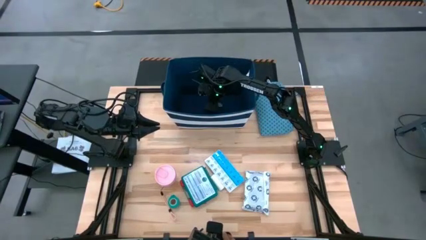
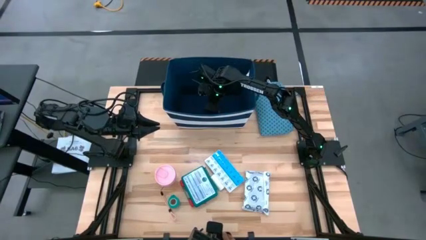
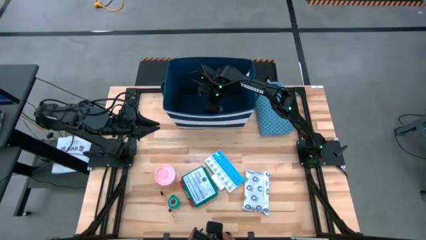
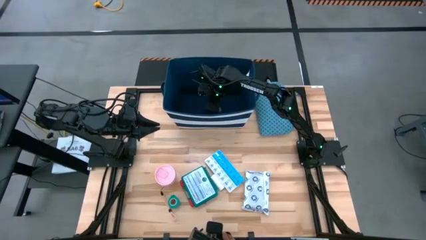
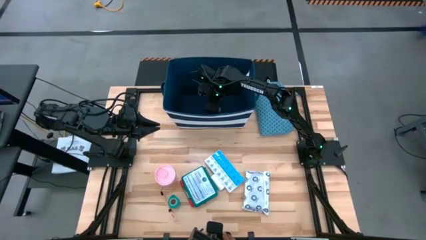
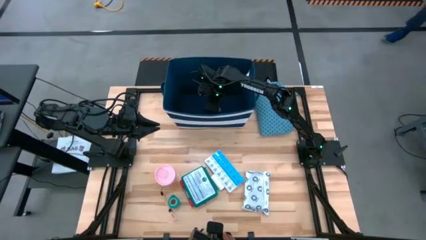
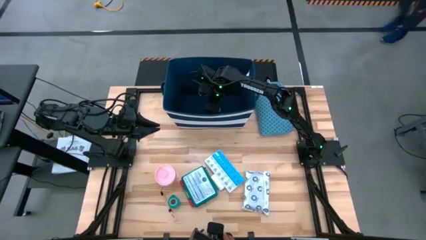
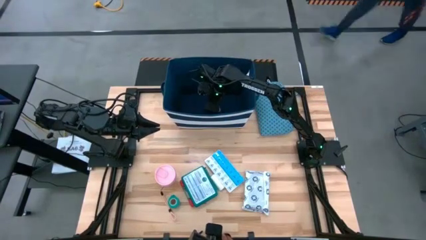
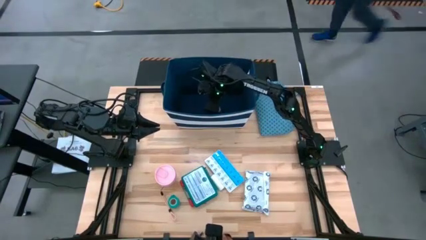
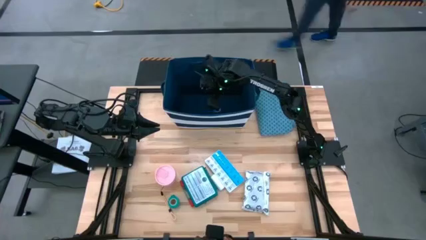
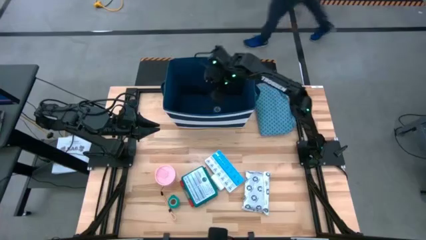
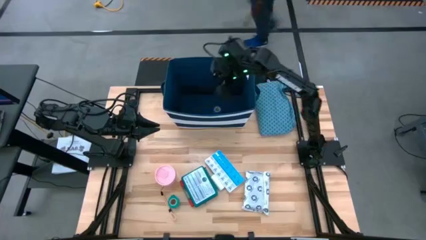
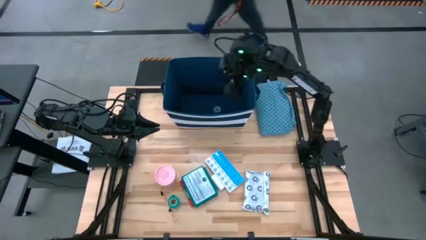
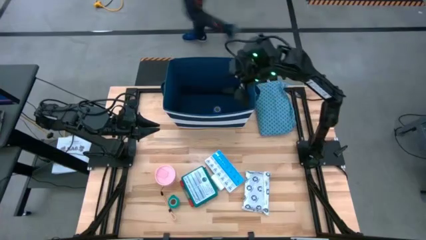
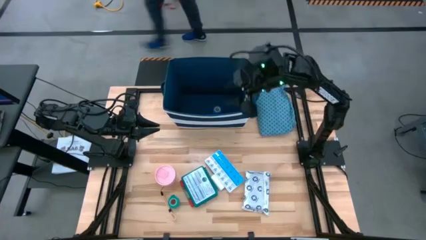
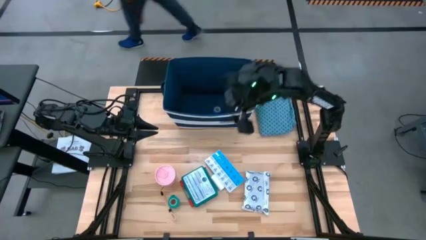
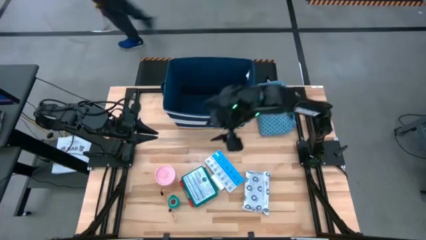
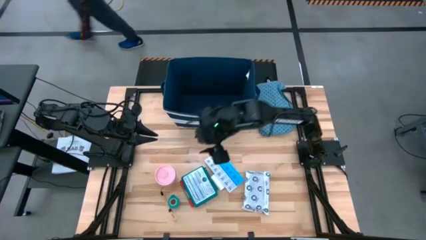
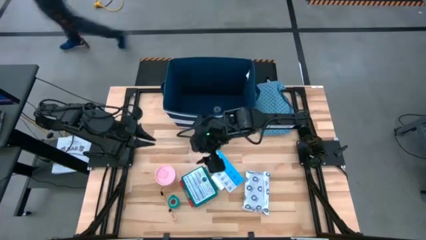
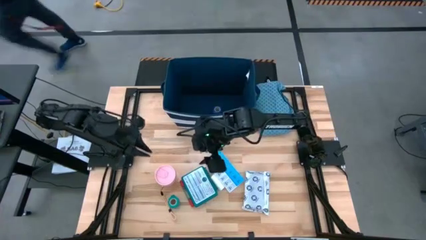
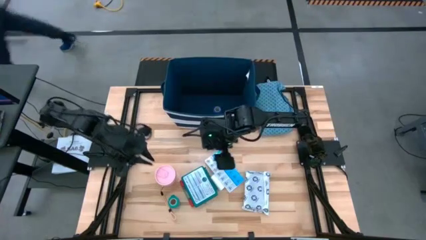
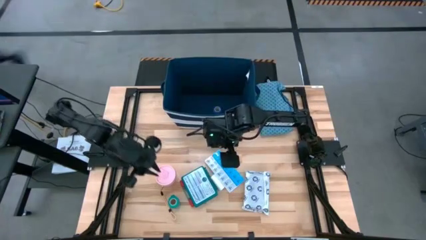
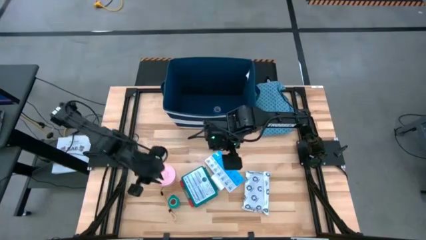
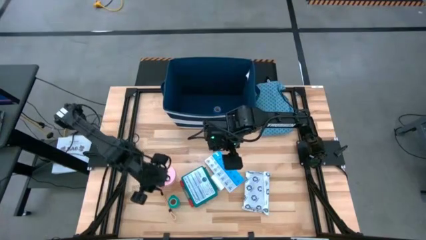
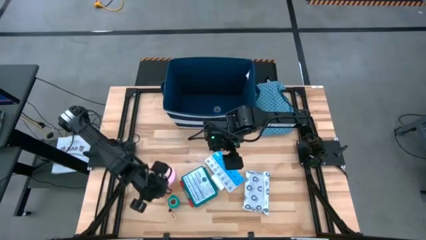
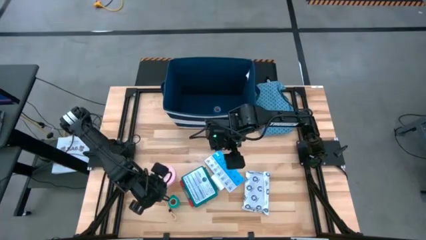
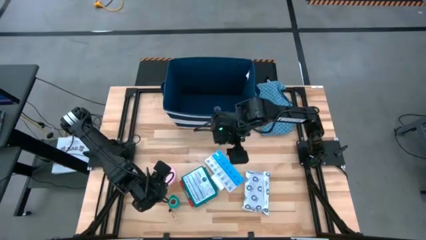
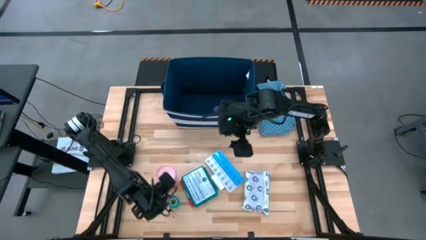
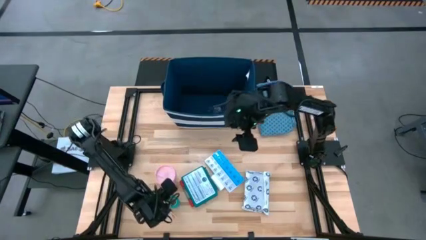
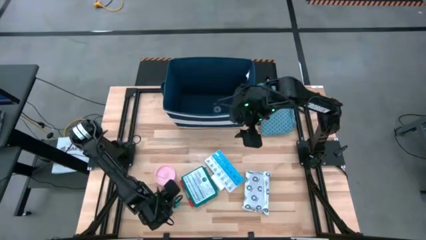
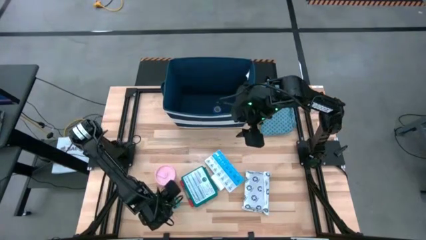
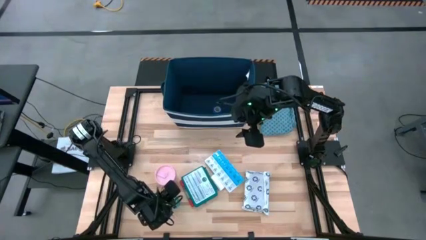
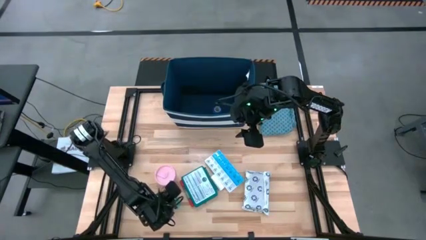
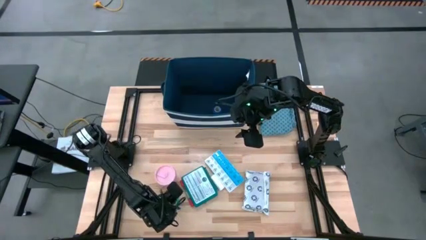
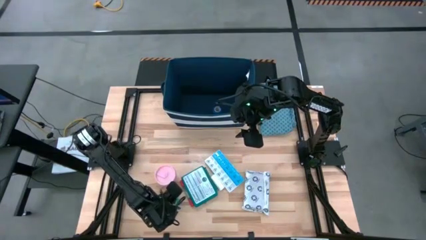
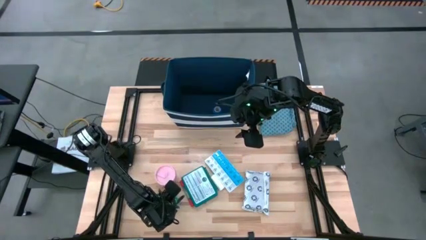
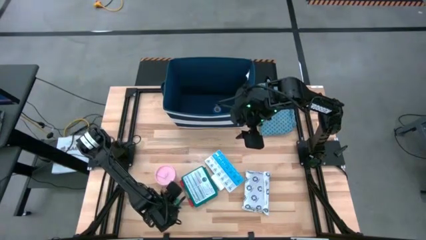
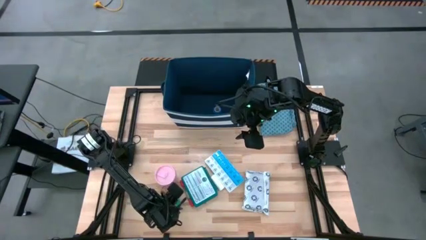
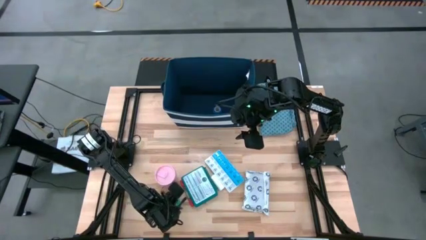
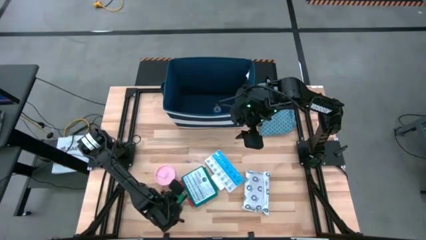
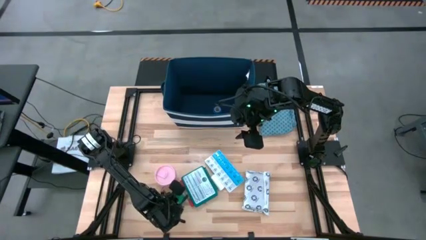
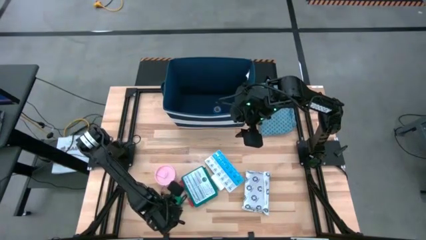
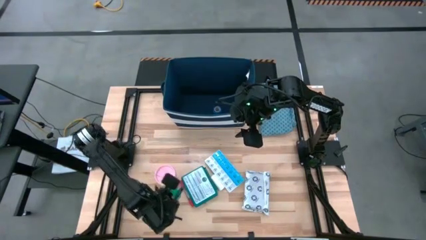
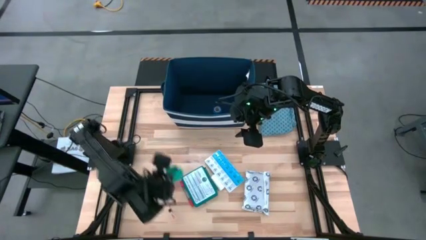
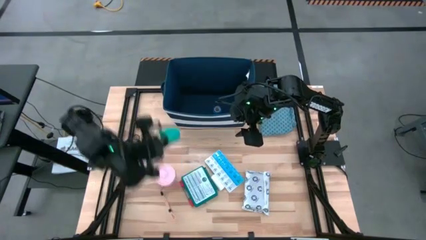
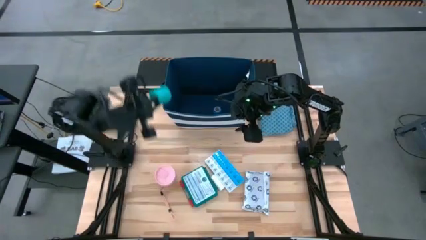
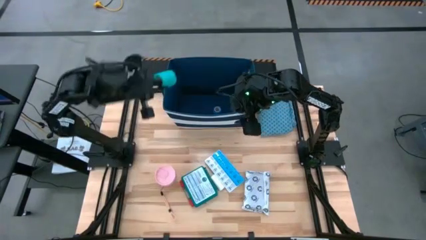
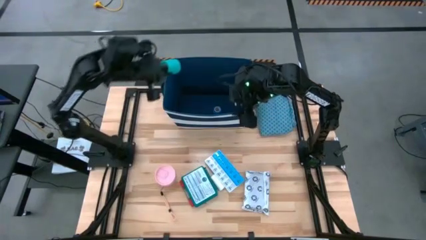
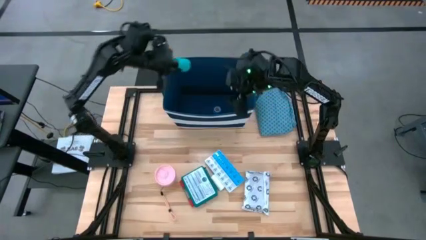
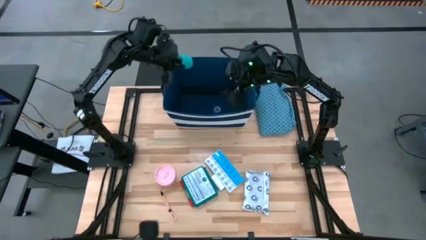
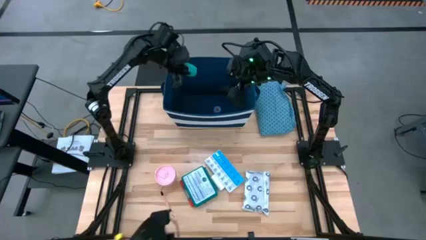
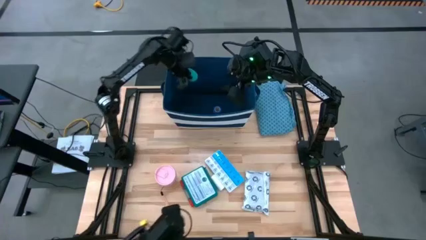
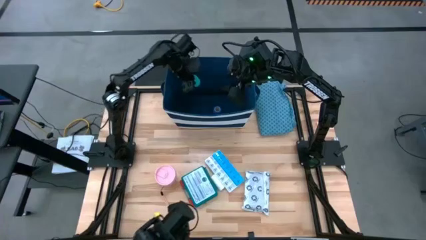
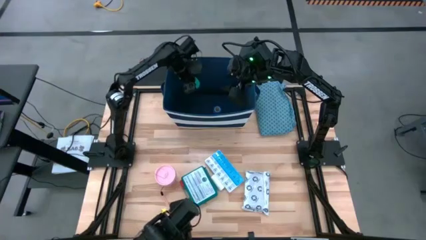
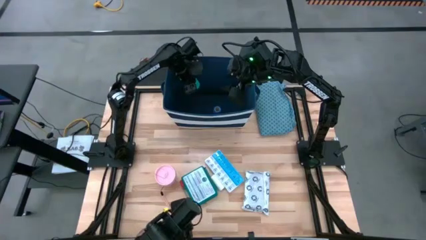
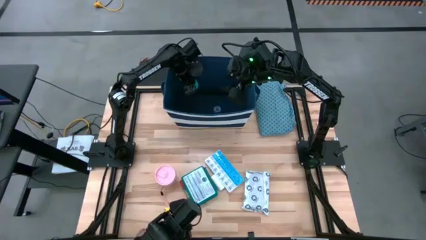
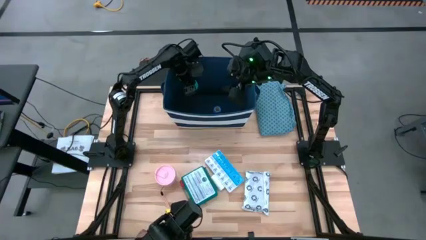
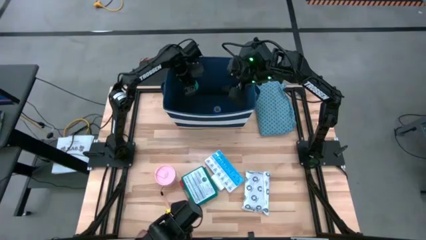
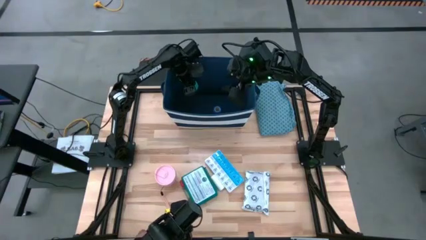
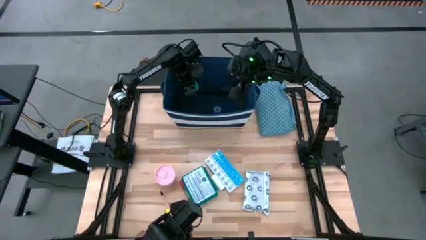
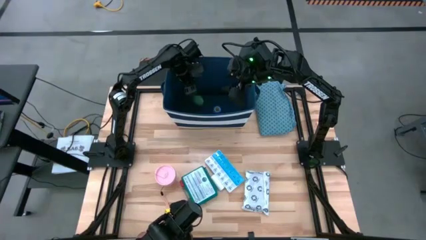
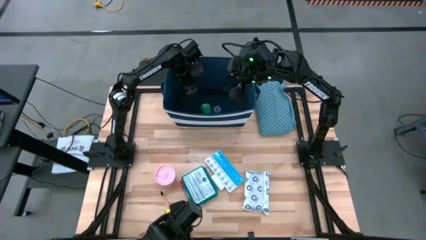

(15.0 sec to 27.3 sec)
Task: Pick & place medical supplies in basket/bin
Put the green bandage into the bin
